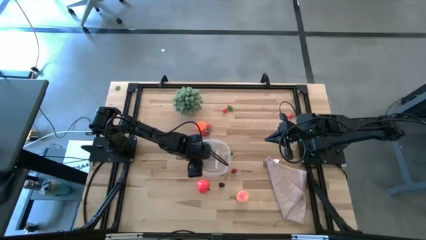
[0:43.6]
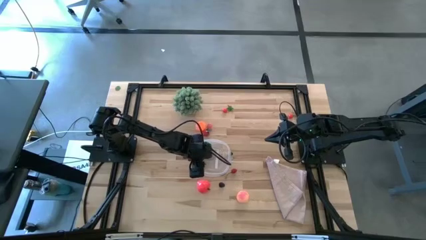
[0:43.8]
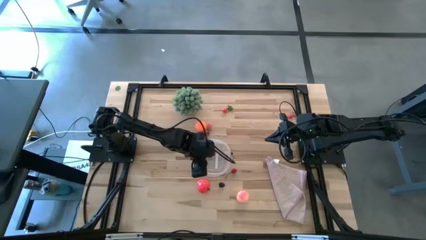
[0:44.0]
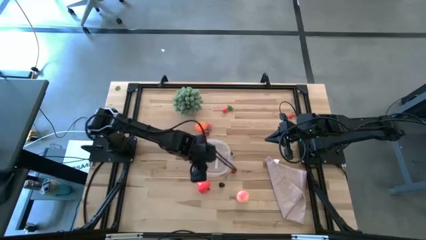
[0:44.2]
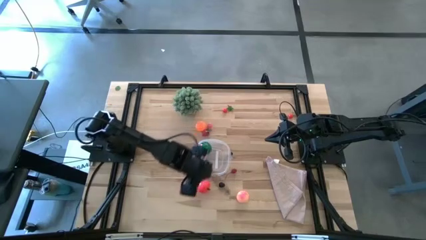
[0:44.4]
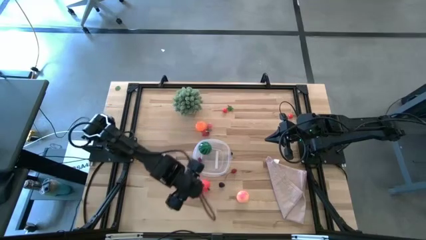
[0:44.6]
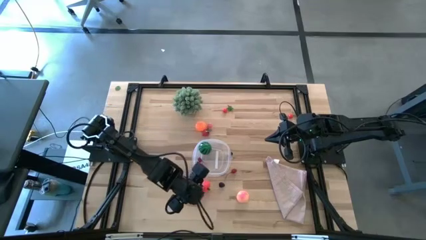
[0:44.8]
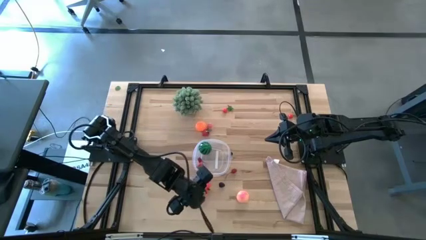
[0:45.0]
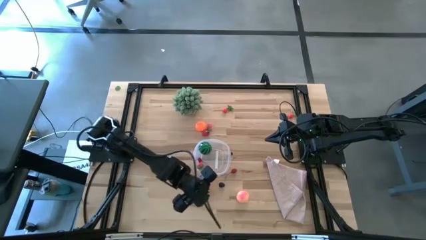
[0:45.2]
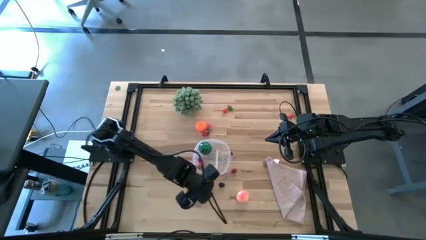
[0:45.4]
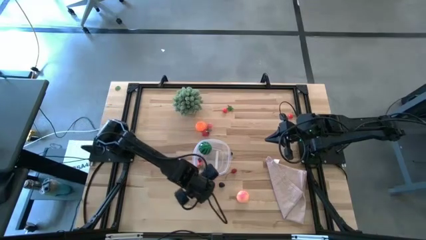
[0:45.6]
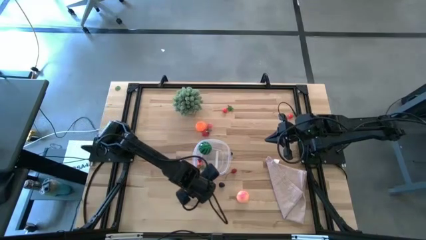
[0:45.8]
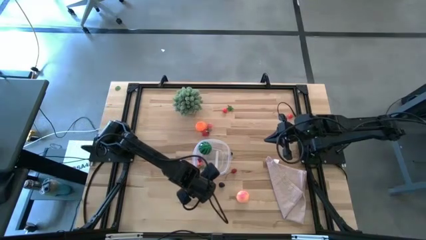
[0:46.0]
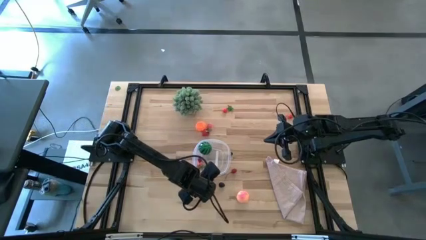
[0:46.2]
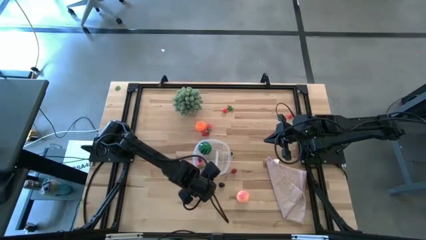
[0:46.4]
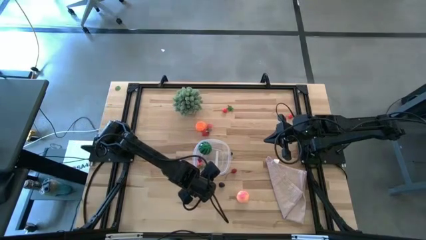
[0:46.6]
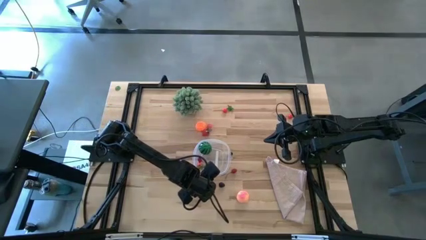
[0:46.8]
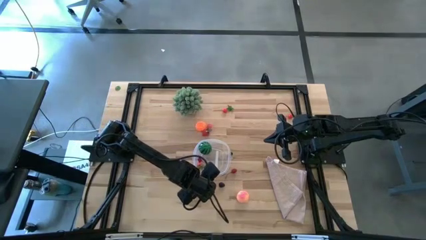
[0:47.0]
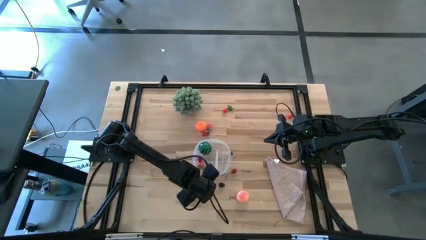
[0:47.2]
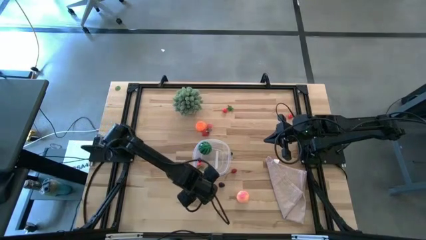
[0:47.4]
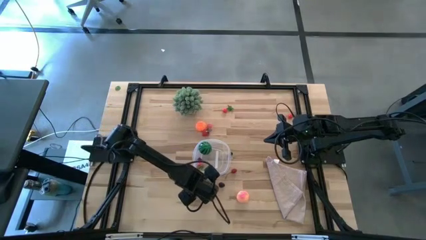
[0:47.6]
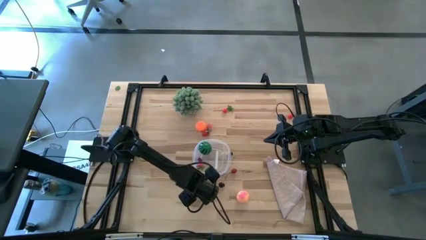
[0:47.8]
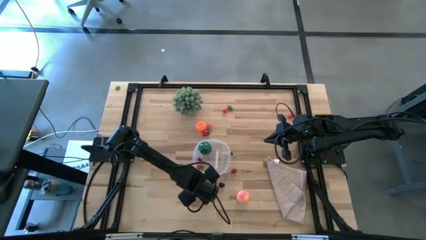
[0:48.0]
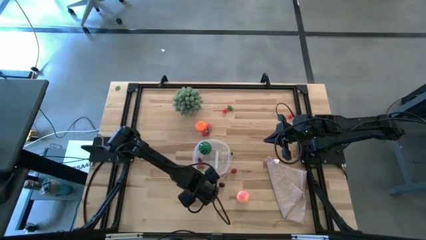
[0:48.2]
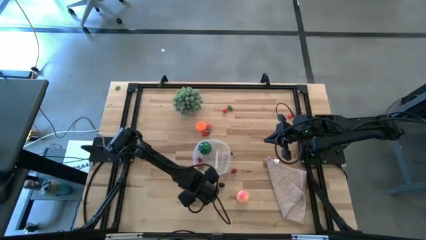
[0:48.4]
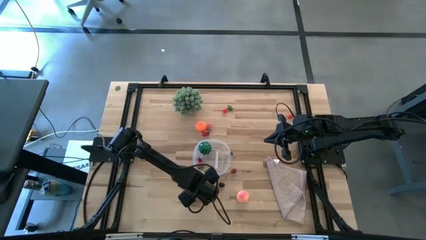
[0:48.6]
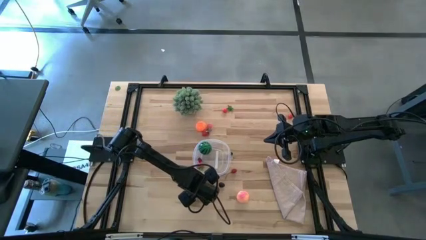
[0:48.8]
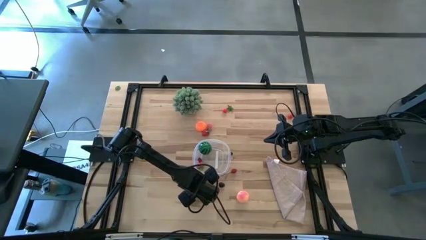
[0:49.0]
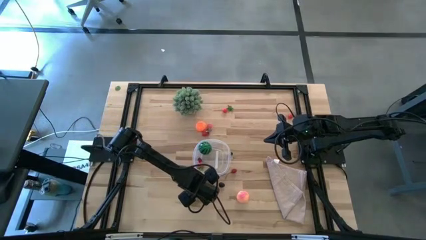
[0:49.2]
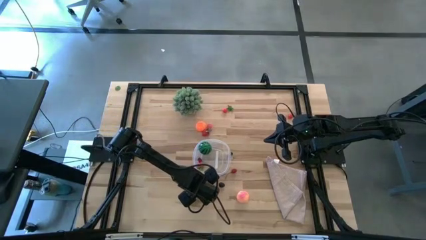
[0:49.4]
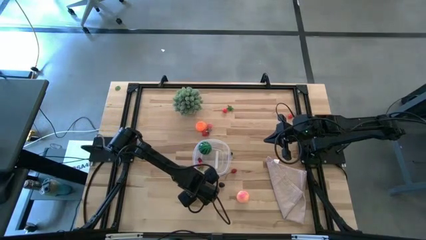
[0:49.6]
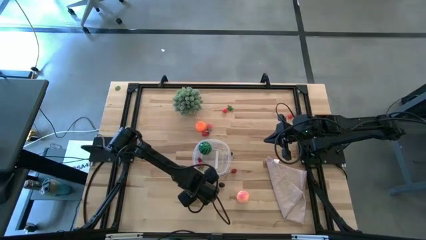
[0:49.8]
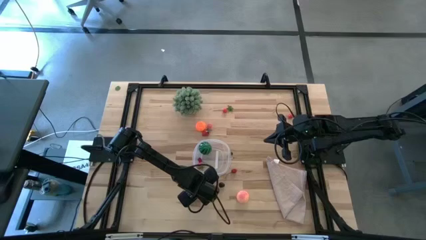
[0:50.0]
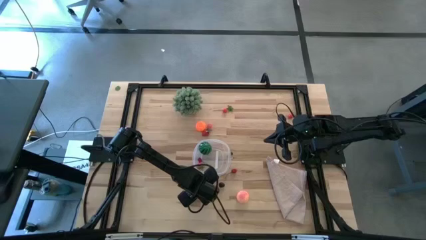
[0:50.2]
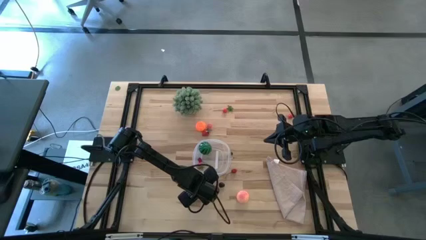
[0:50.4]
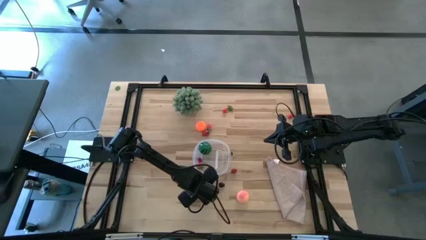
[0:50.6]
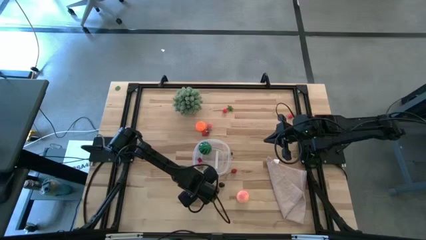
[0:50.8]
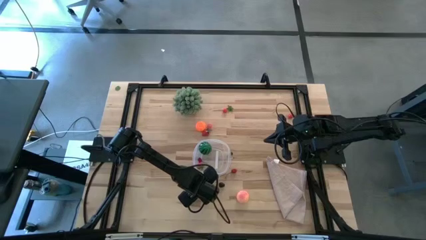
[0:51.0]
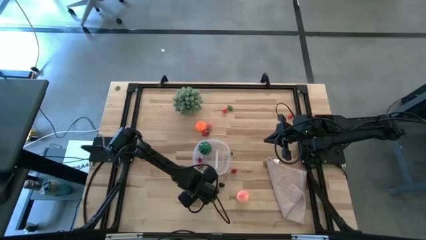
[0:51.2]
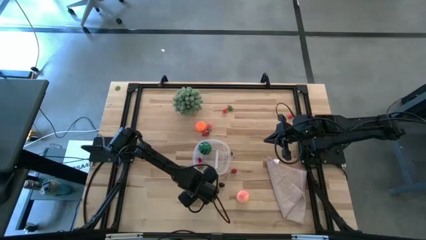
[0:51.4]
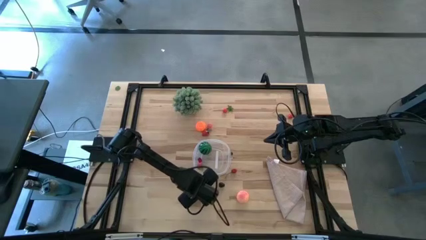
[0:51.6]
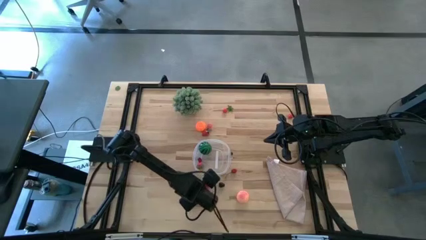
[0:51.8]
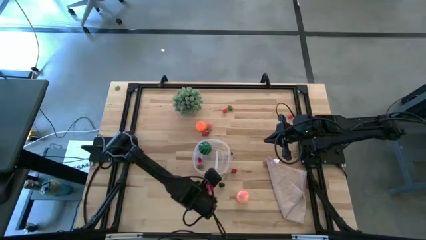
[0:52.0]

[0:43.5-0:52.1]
Task: Pick and placing Produce into tupperware
Put the apple into the transparent container

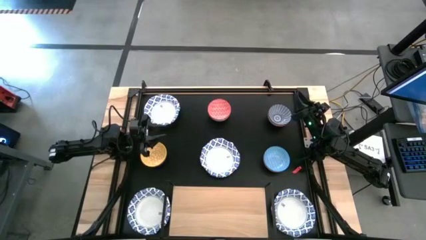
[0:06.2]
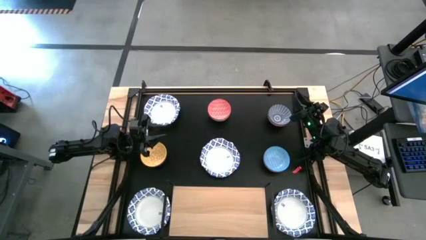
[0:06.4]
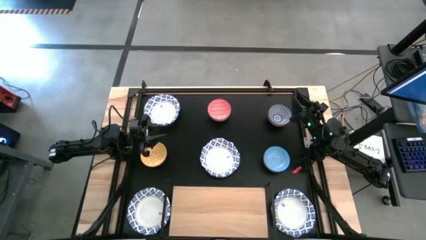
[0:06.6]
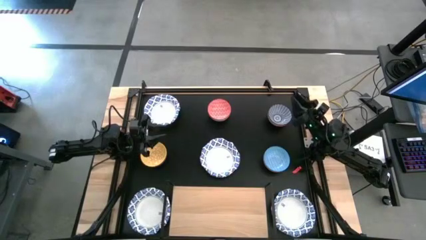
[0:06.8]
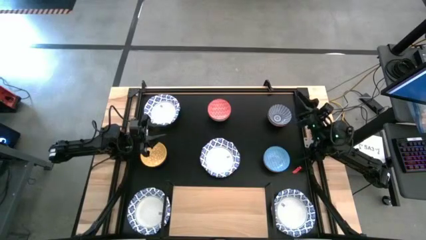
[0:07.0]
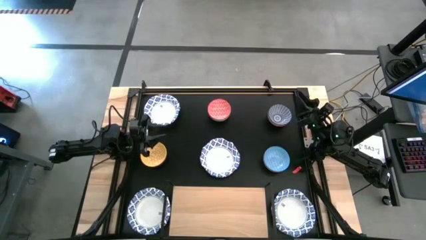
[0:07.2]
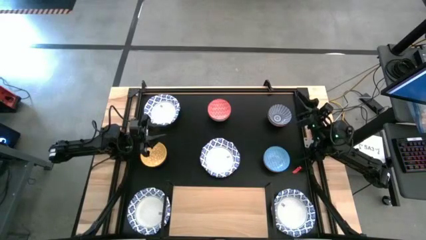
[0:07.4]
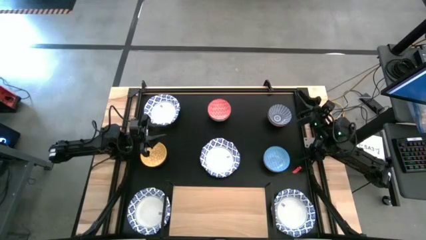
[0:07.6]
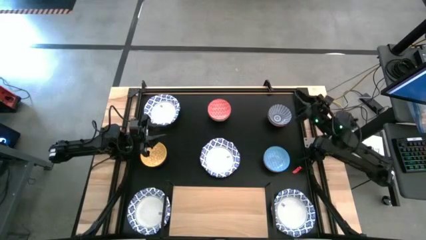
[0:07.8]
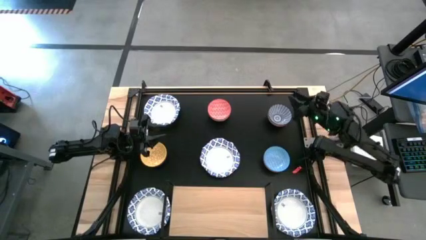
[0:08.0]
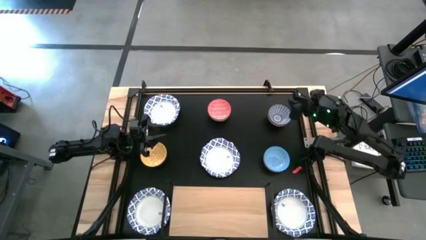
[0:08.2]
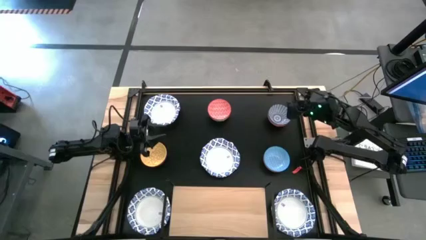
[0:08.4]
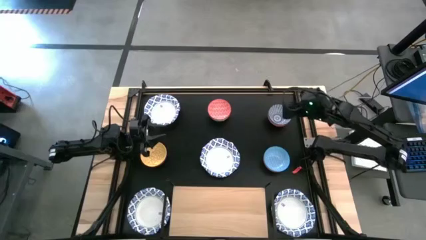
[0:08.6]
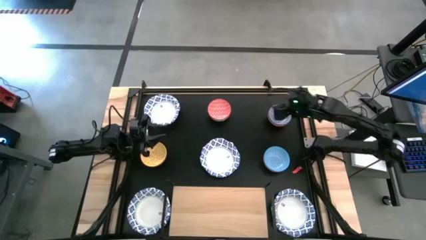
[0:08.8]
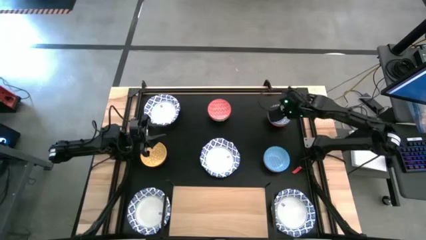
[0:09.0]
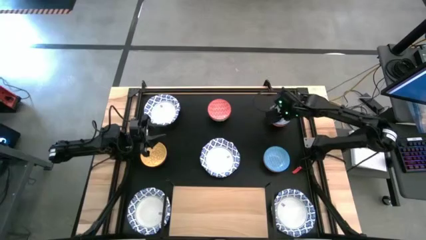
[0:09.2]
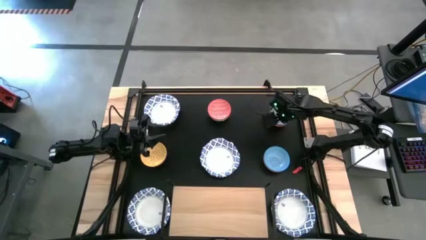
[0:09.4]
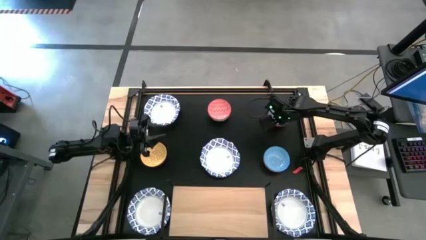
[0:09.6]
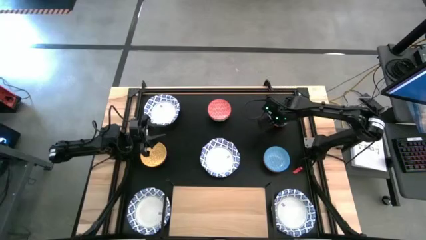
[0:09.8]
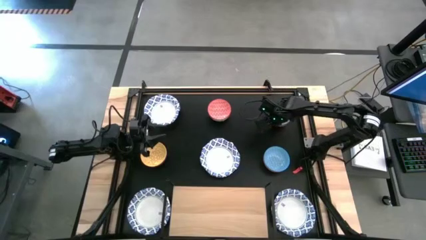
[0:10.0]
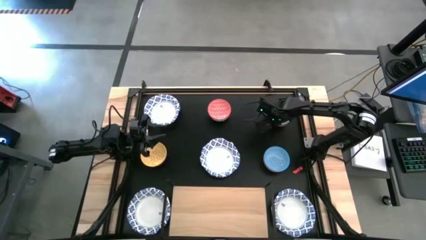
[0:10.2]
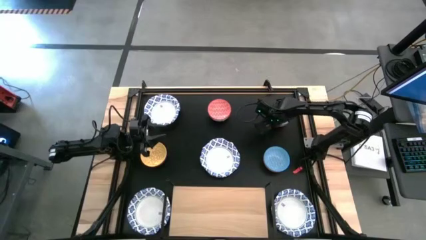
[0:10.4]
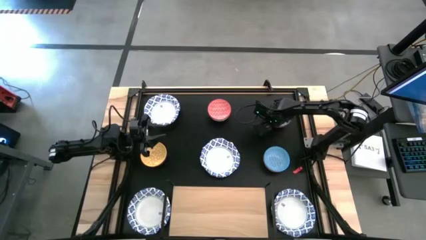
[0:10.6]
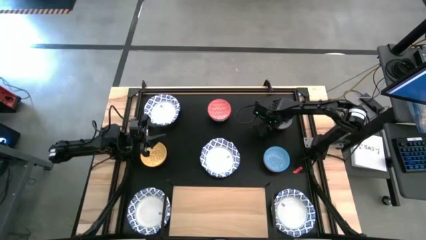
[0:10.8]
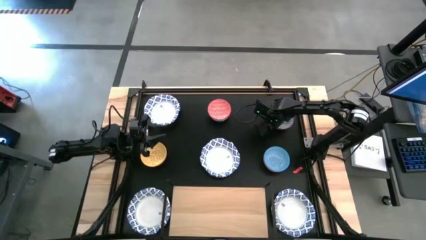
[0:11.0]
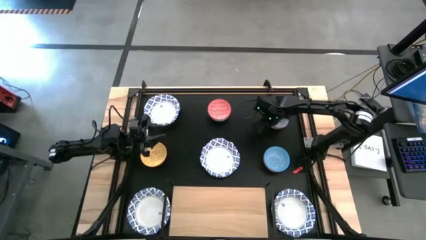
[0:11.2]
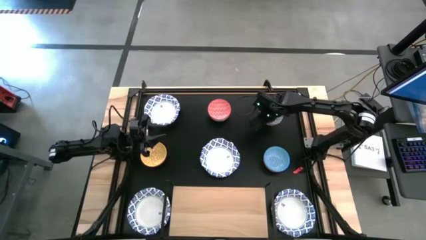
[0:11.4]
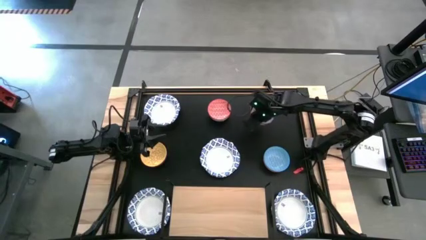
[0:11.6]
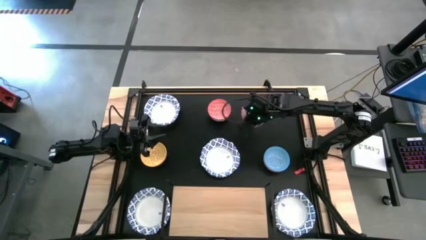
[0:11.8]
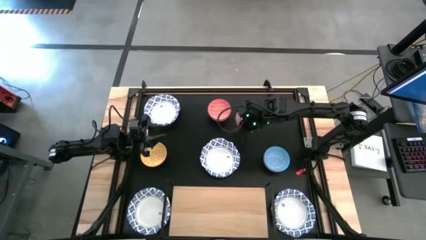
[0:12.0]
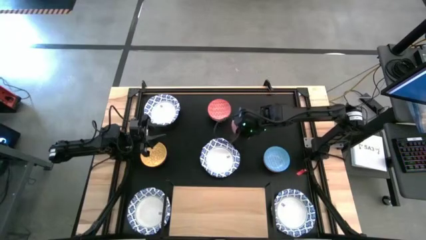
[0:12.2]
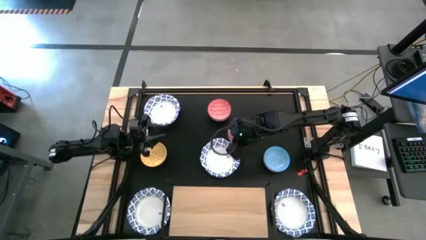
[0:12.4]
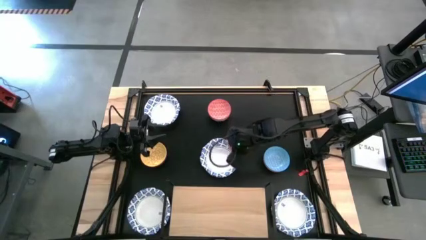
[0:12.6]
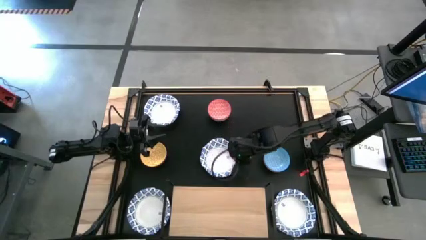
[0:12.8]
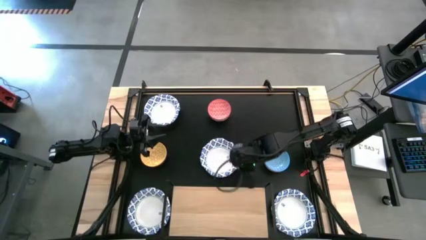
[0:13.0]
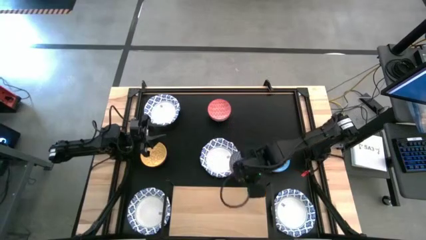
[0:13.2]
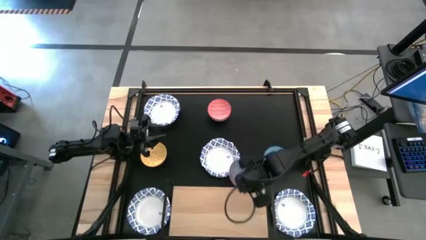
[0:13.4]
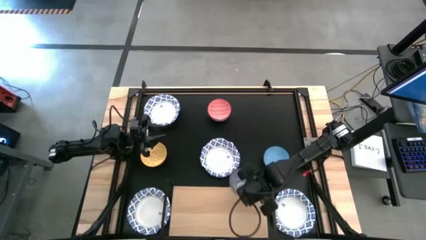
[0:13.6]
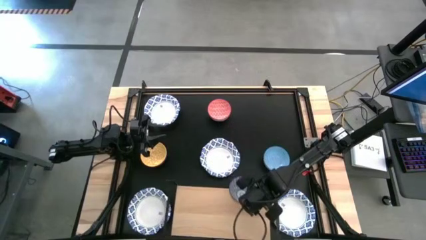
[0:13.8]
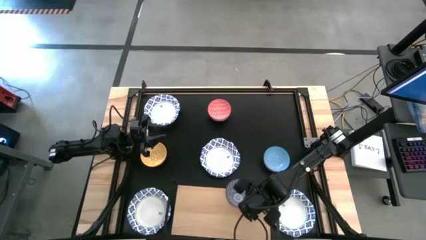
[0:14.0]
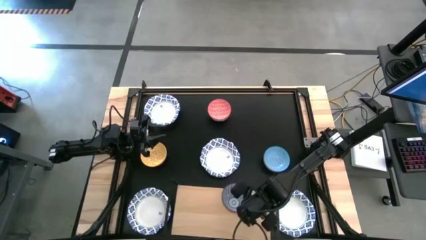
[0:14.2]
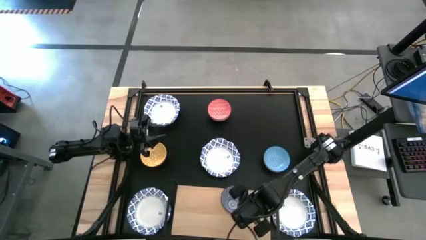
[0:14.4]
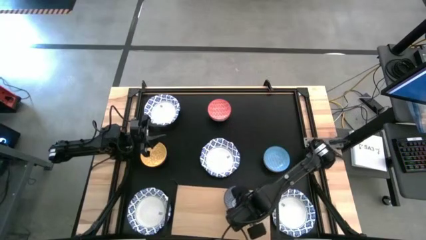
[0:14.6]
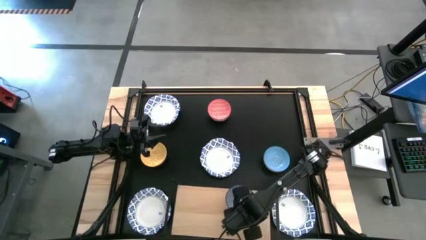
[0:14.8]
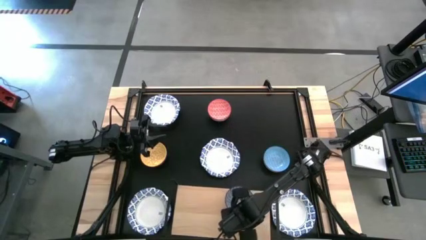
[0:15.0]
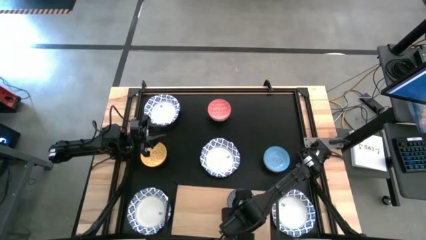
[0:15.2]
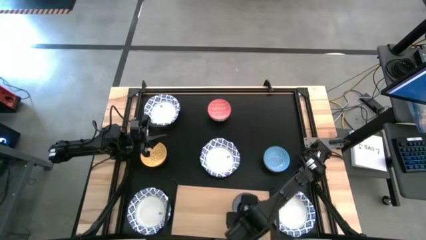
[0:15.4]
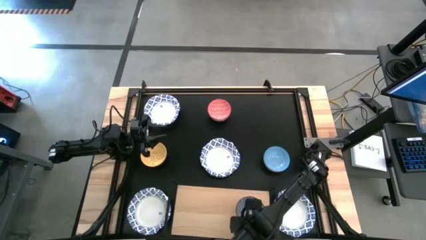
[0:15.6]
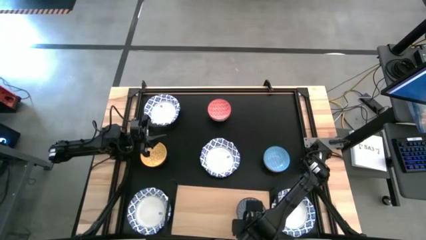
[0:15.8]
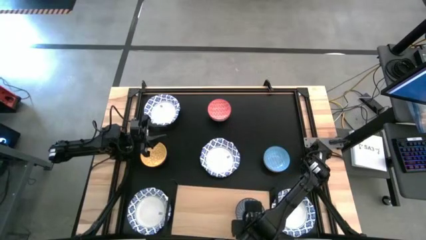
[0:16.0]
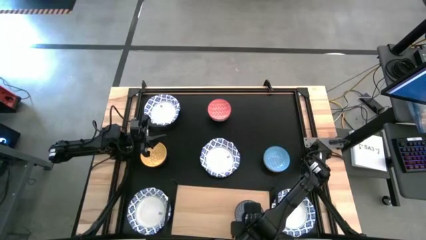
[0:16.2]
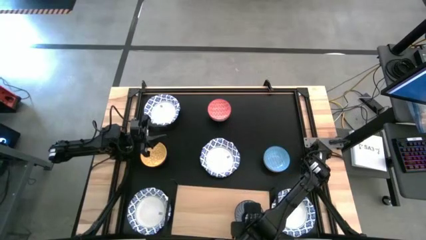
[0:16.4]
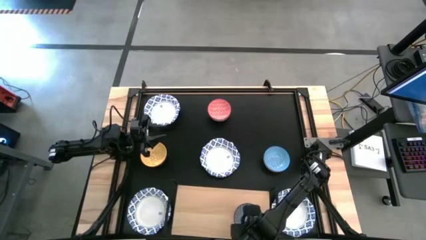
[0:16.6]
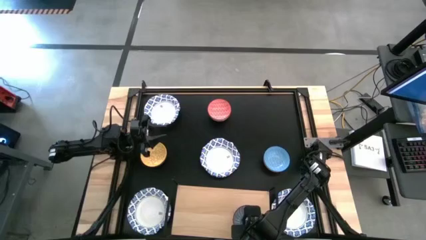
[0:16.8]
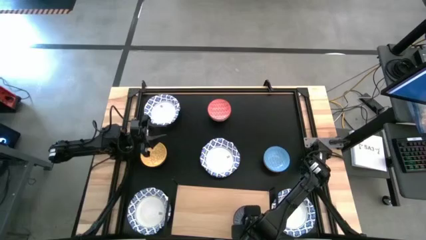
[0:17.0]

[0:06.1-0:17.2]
Task: Place and stack bowls onto a shelf
Put the small blue bowl on the shelf
